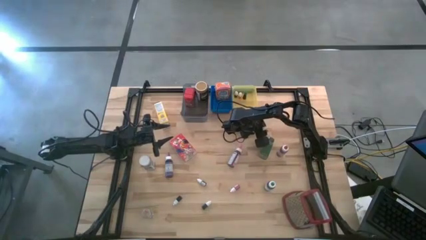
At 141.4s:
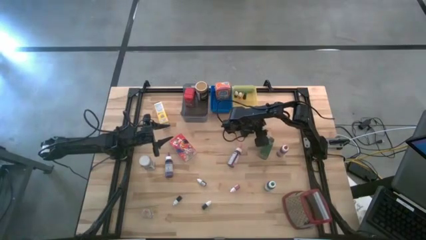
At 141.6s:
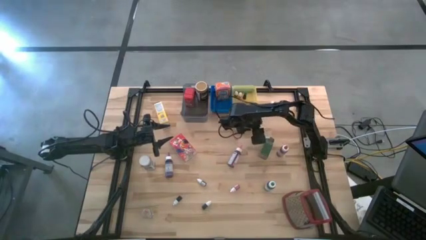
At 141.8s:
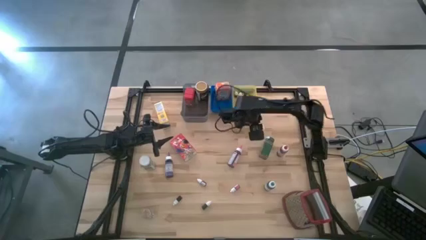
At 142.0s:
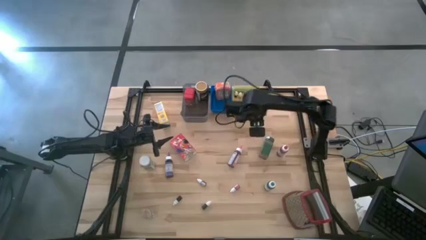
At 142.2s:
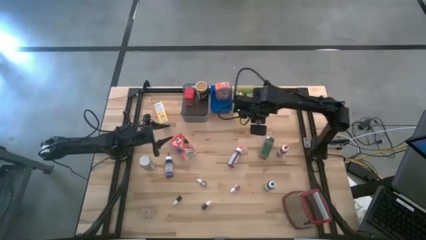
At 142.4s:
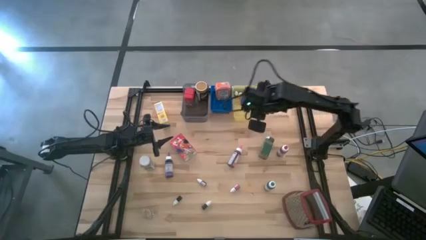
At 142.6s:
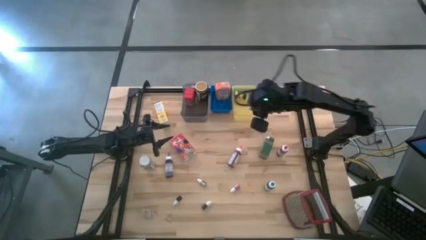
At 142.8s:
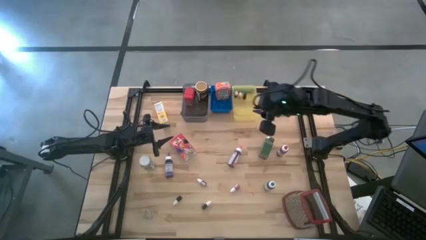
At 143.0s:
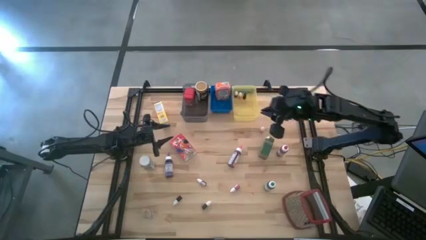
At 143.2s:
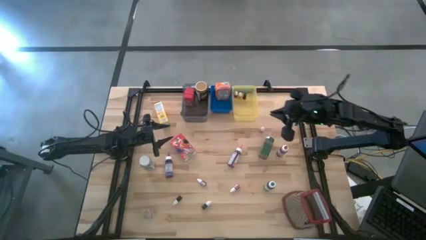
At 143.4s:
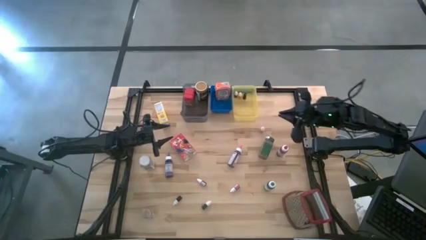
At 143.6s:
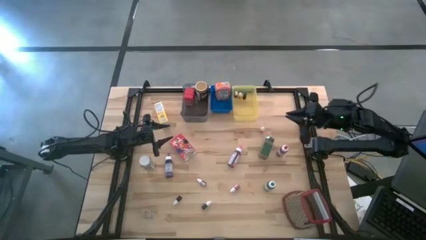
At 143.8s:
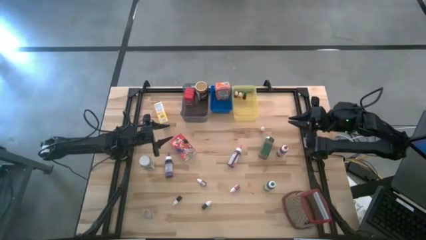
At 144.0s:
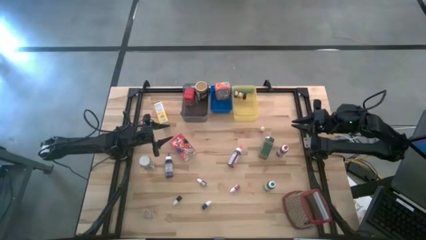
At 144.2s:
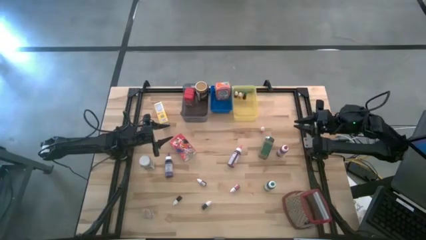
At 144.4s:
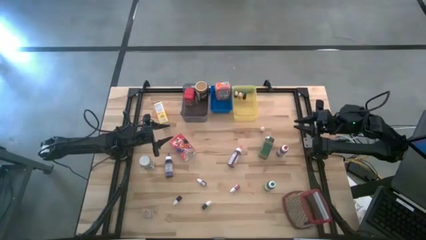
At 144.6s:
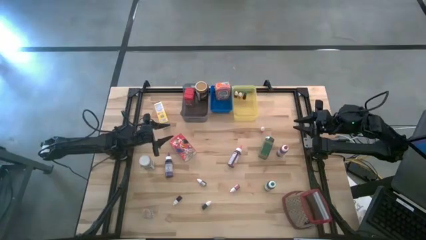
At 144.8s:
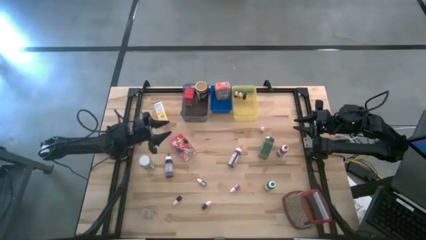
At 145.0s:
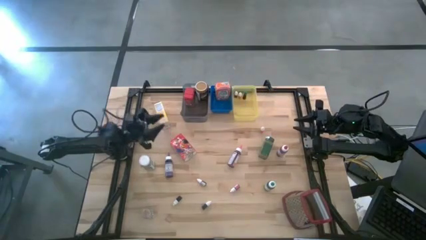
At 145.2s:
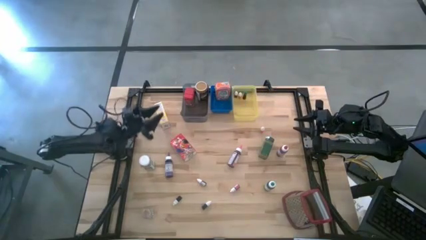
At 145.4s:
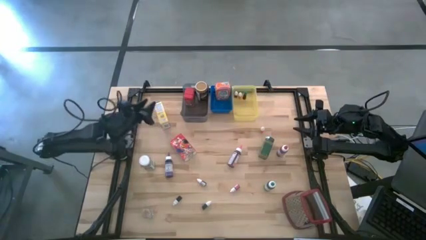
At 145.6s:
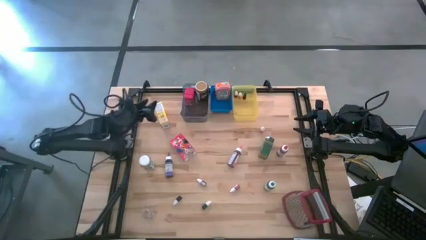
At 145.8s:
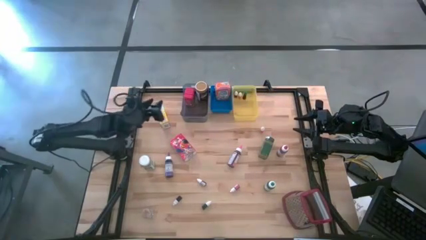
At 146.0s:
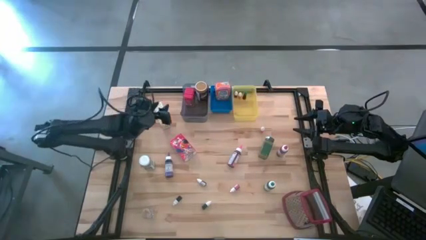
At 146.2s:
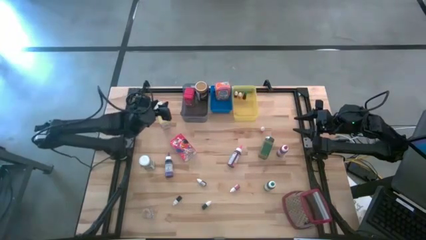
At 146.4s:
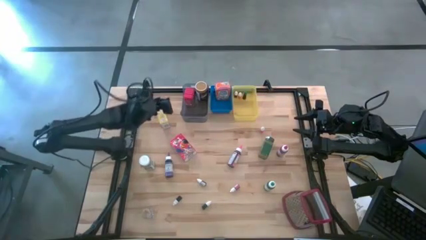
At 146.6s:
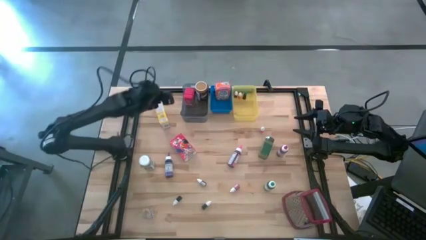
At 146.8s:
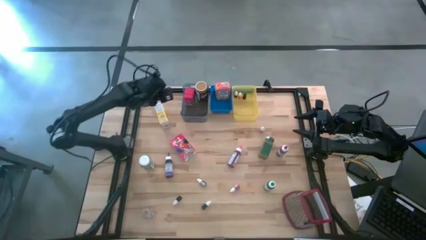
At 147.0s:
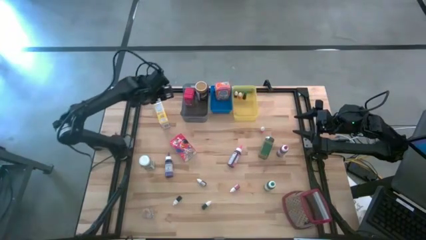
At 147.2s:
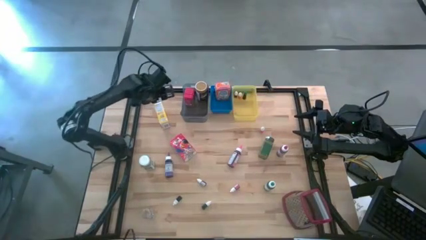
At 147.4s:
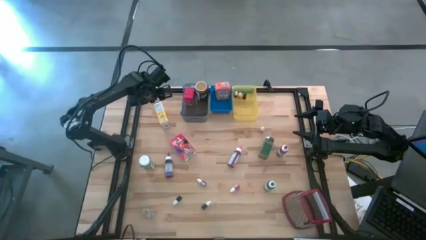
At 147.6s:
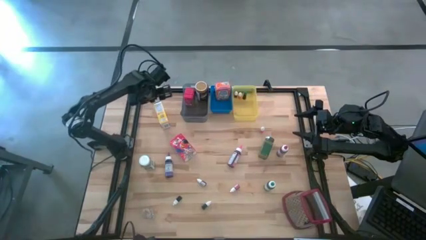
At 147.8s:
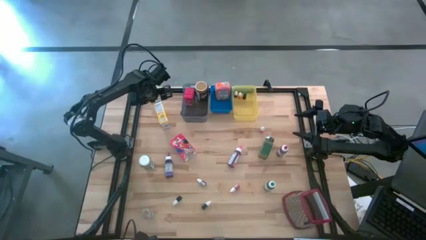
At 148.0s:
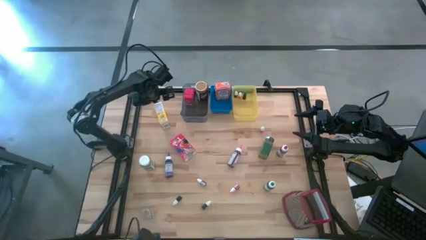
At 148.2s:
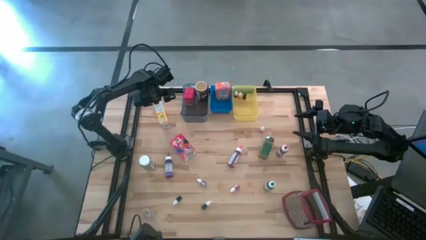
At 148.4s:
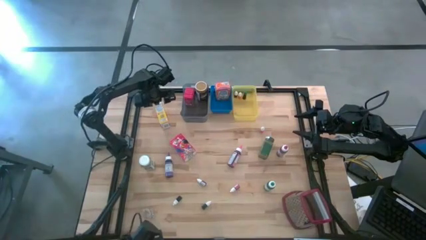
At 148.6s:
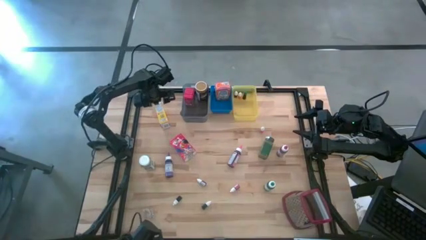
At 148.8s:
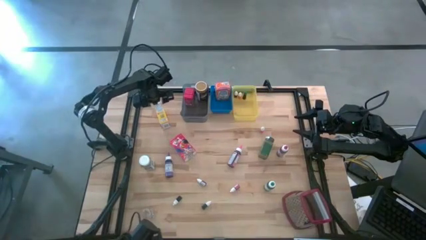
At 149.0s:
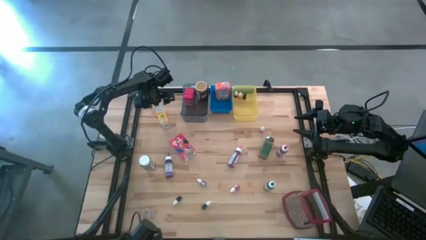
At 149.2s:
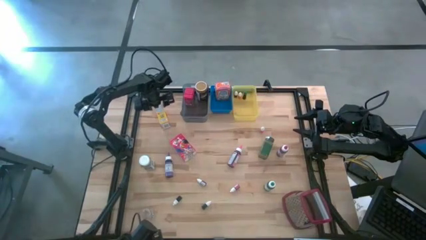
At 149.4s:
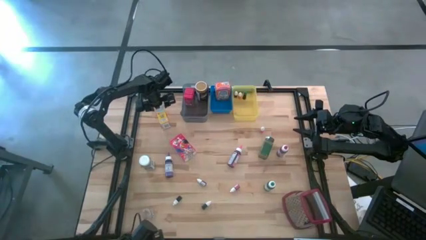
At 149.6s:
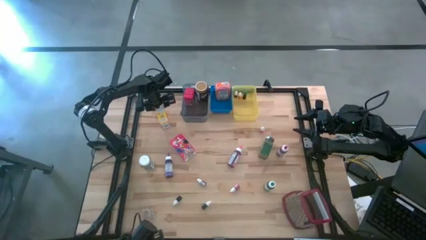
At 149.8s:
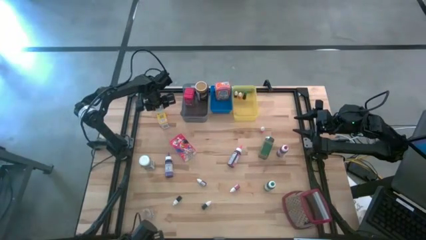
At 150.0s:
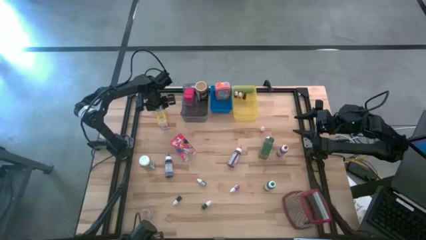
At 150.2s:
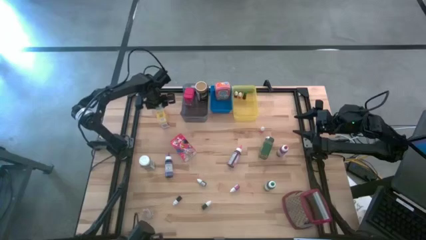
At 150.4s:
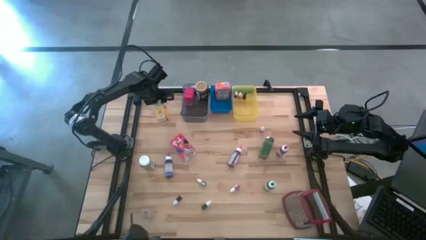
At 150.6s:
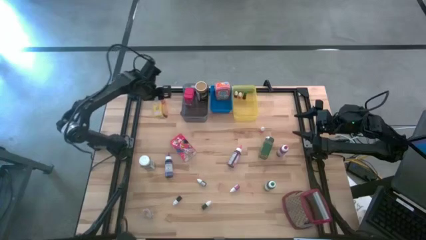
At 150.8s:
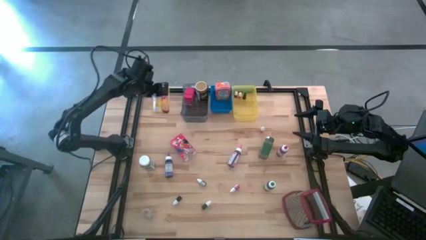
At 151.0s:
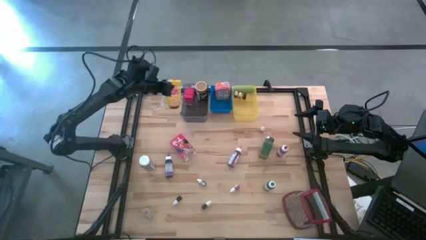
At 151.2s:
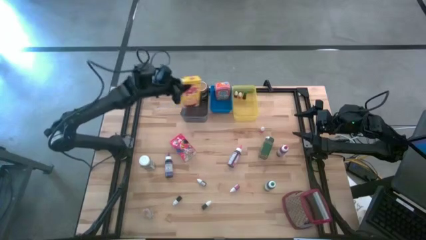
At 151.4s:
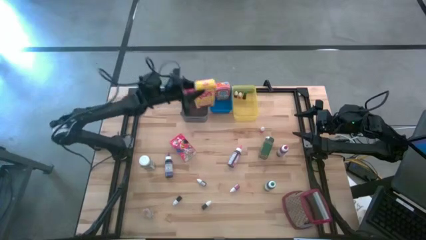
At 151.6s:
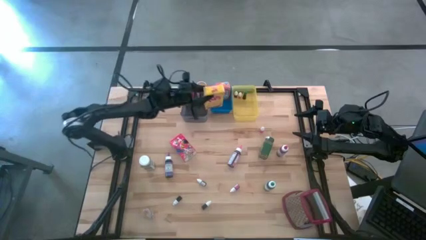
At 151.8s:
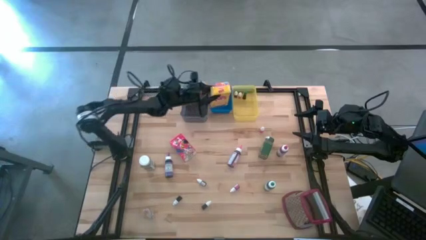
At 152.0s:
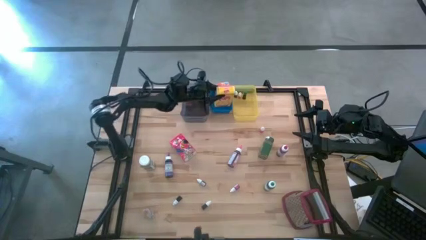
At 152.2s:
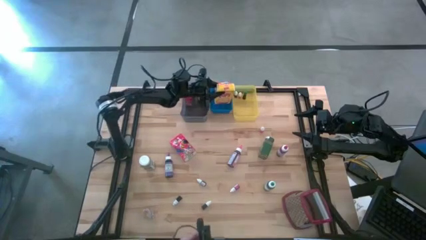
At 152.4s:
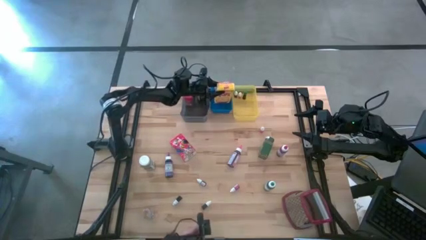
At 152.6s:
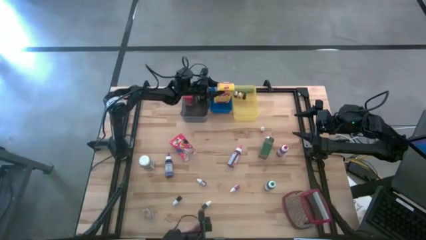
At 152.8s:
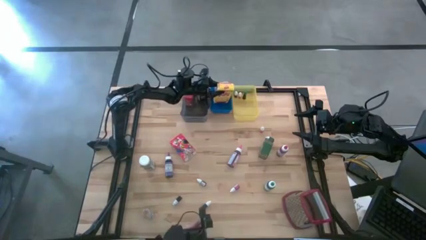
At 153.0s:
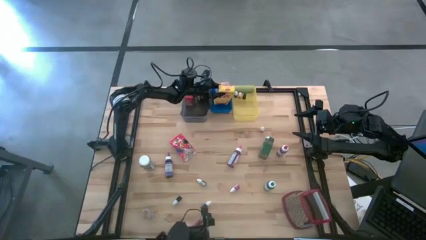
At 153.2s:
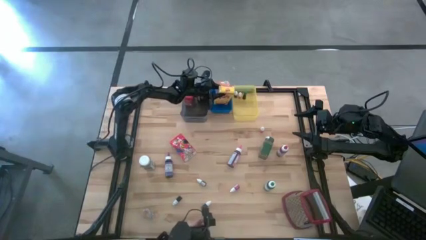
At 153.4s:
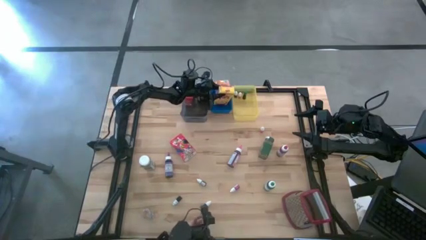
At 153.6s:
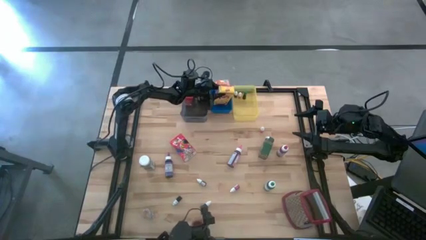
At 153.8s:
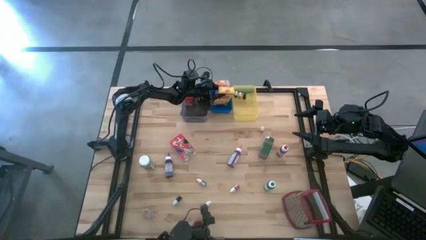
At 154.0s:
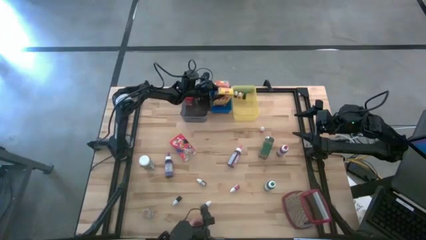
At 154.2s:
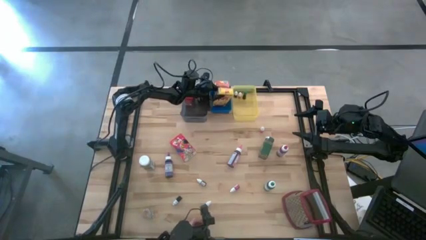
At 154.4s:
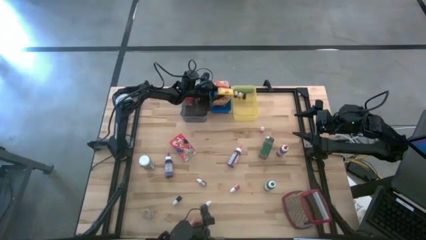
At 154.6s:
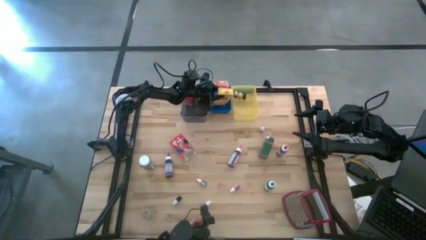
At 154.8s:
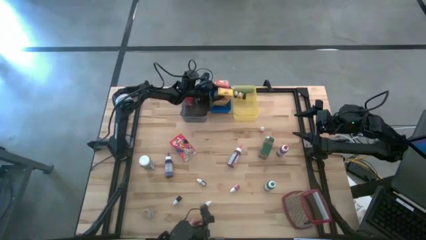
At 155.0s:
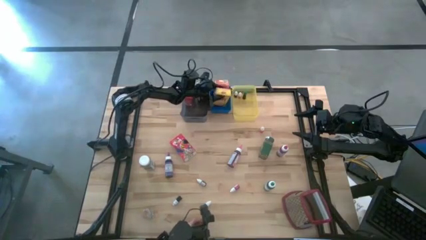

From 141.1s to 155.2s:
Task: Pick & Place Kitchen Items
Put the yellow cereal box into the blue bin

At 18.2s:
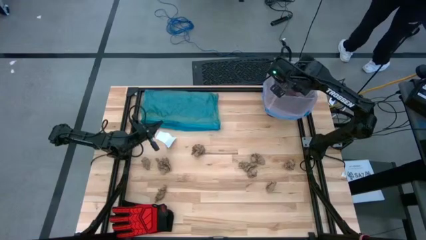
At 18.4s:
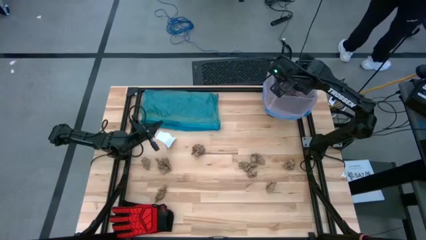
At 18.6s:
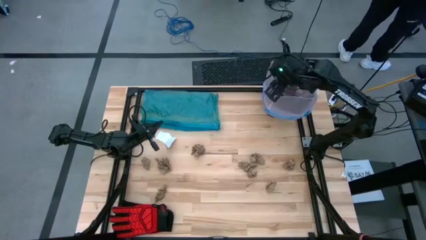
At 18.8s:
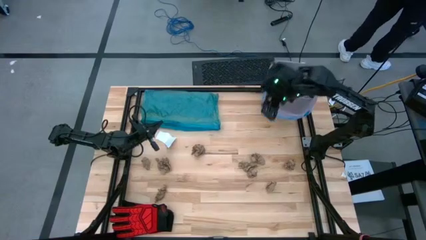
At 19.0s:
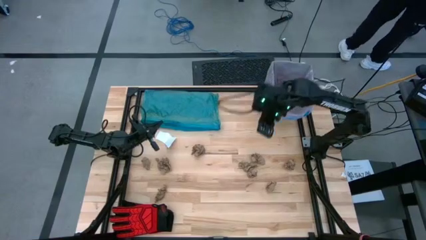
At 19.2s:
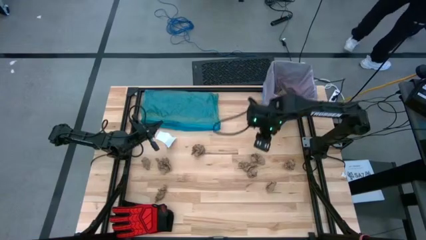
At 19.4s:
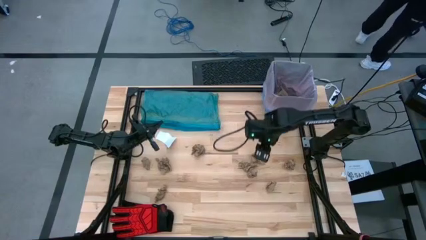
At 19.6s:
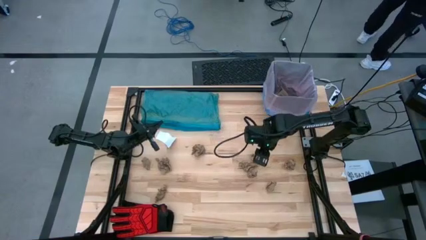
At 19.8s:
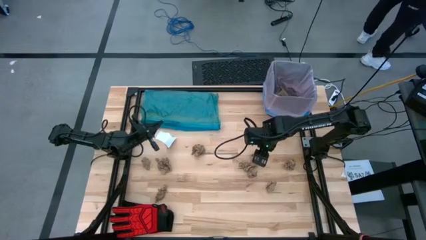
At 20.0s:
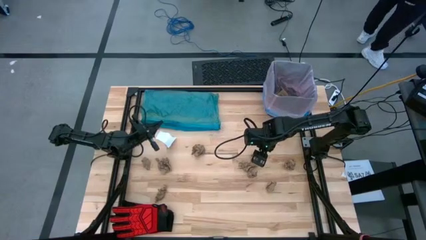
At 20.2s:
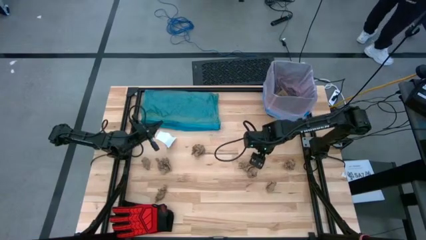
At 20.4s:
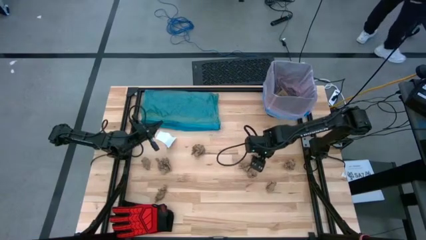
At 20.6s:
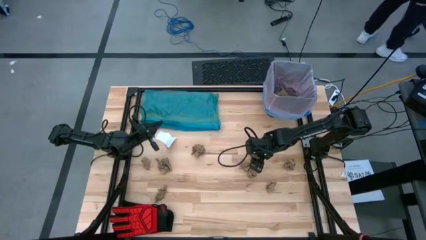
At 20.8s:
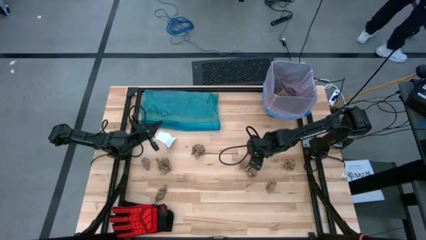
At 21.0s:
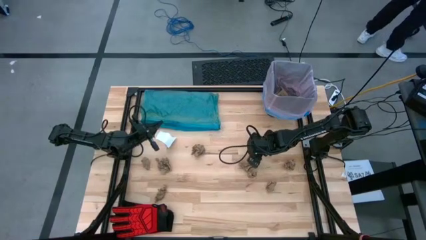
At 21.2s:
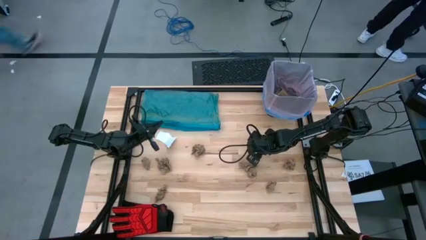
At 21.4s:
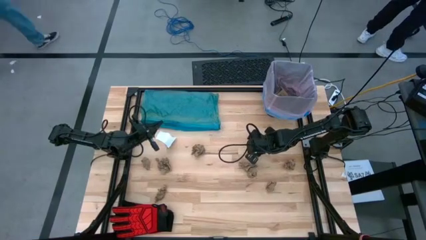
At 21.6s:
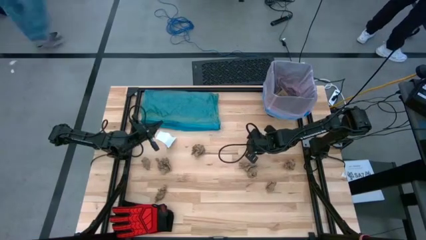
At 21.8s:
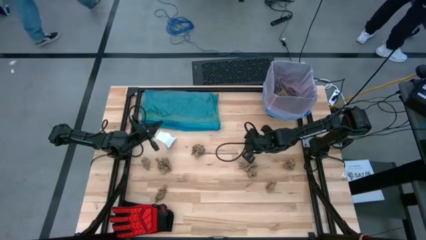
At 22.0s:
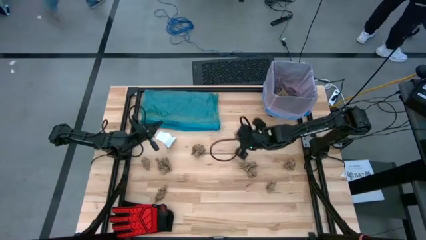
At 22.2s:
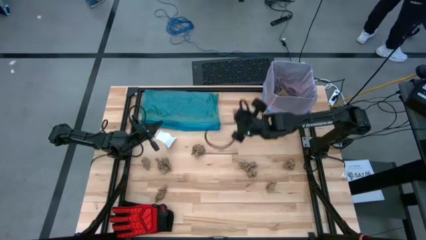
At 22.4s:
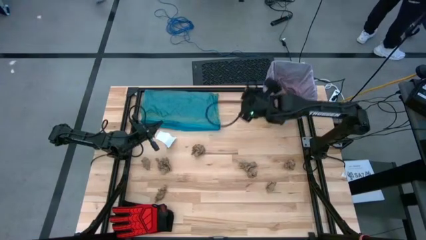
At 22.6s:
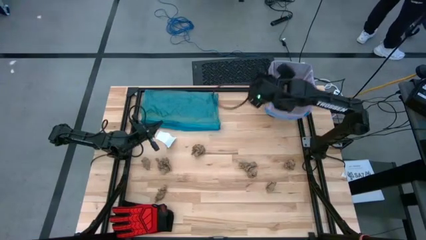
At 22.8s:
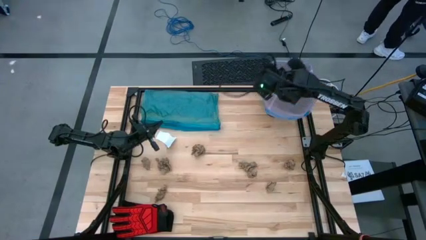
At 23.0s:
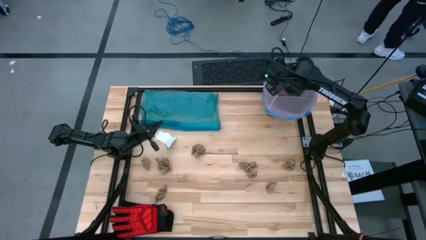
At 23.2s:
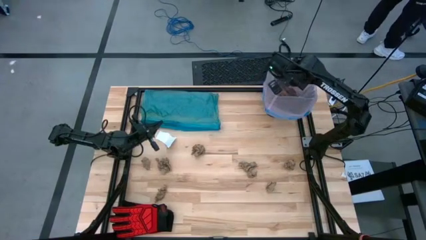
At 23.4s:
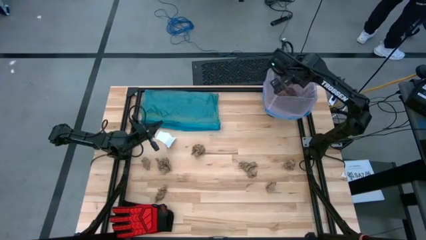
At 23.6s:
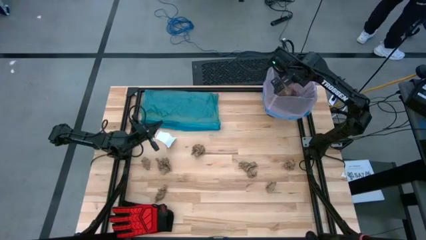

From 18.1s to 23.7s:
Task: place trash/remove bag and relplace
Put the brown napkin into the trash bin
